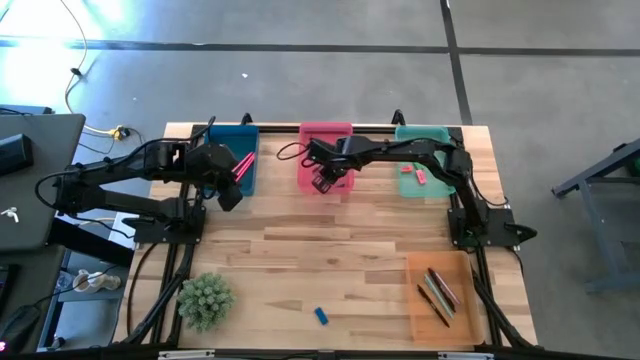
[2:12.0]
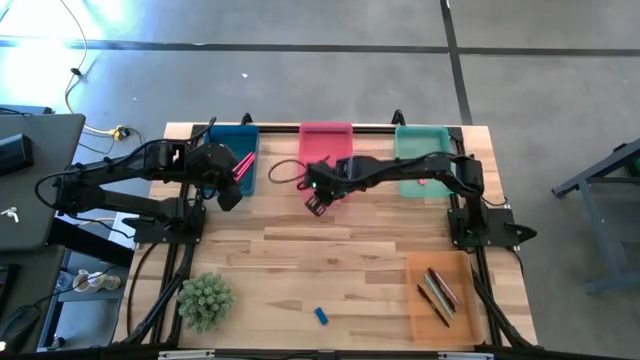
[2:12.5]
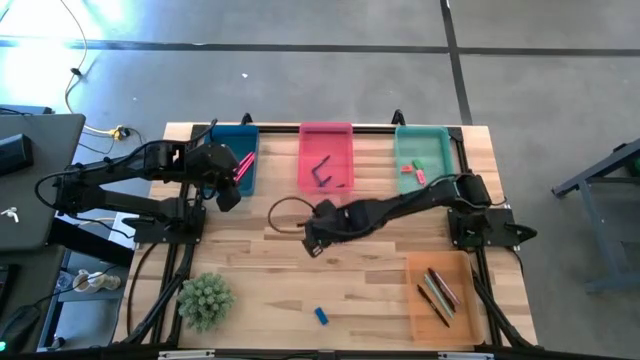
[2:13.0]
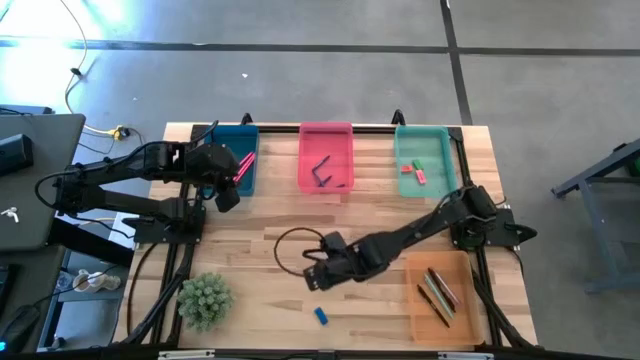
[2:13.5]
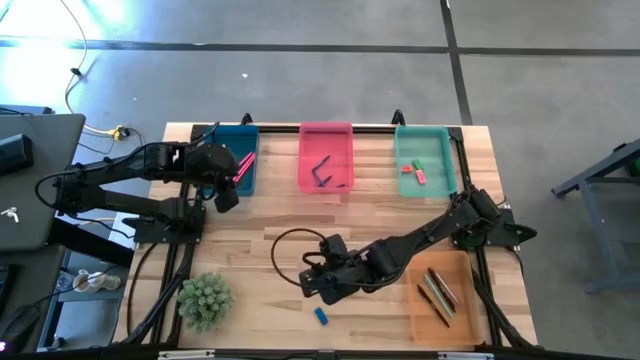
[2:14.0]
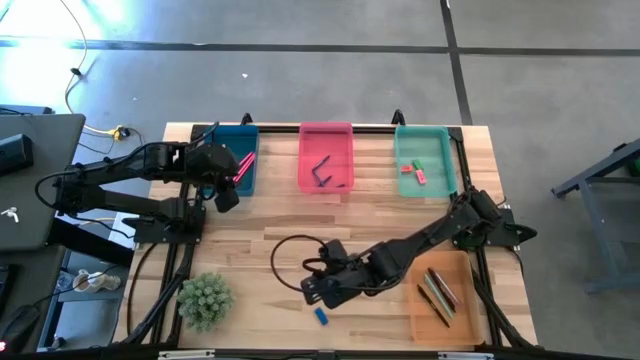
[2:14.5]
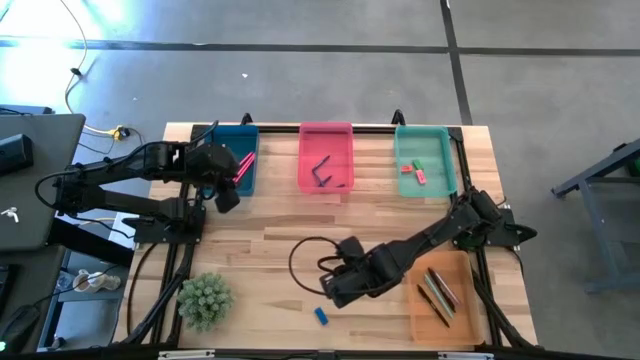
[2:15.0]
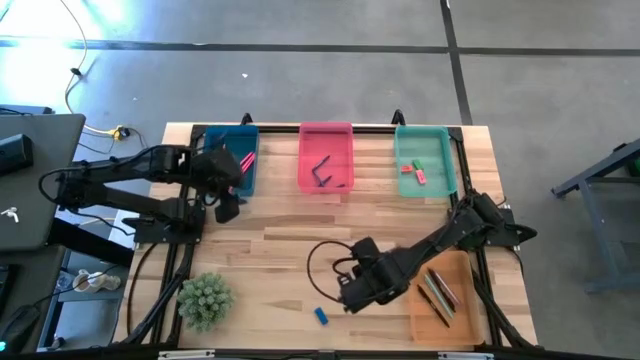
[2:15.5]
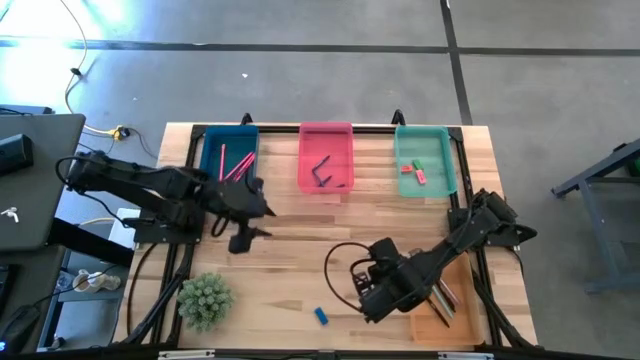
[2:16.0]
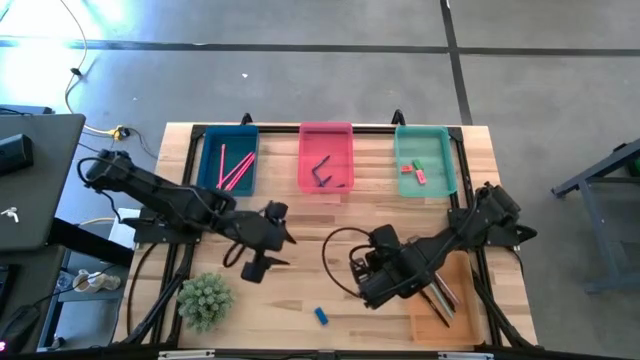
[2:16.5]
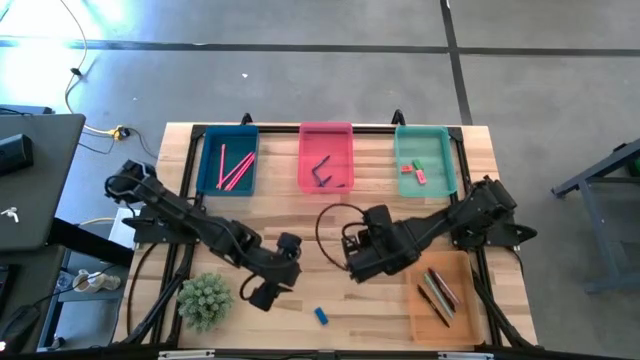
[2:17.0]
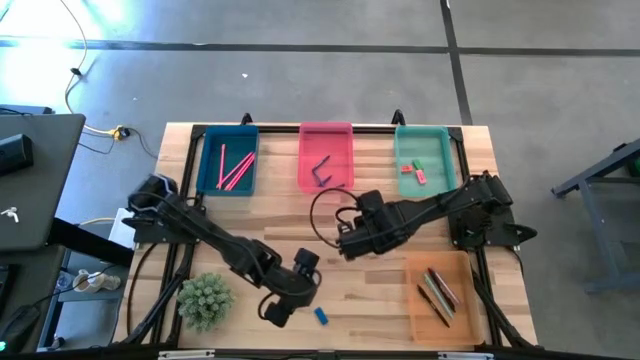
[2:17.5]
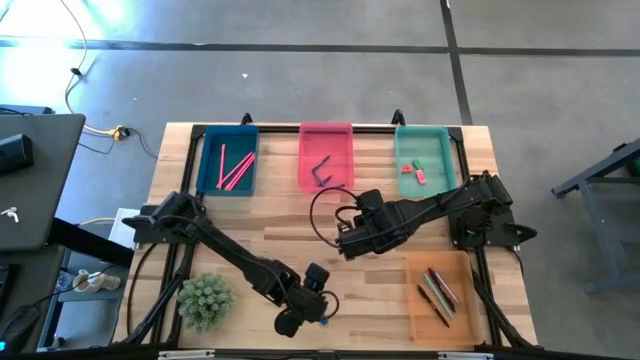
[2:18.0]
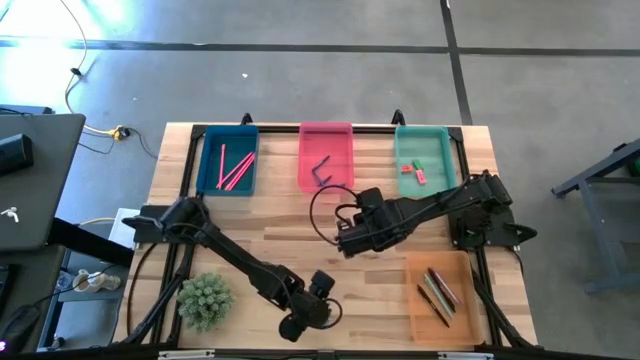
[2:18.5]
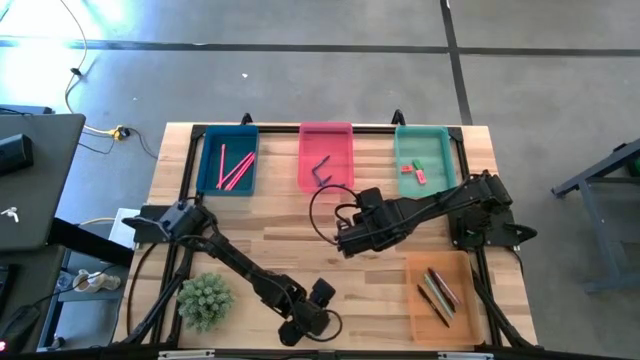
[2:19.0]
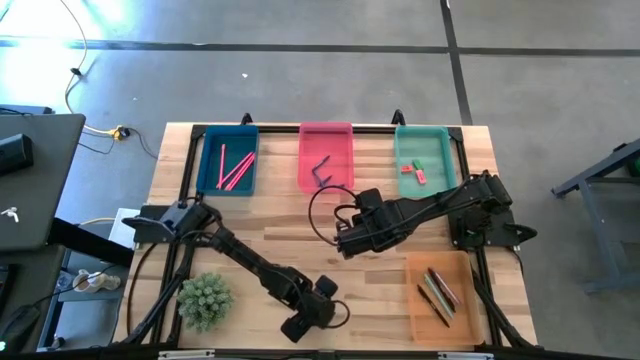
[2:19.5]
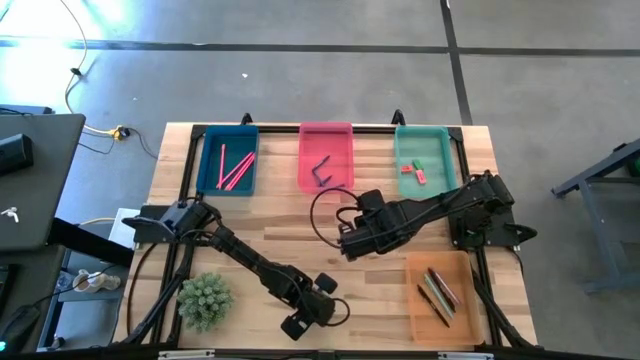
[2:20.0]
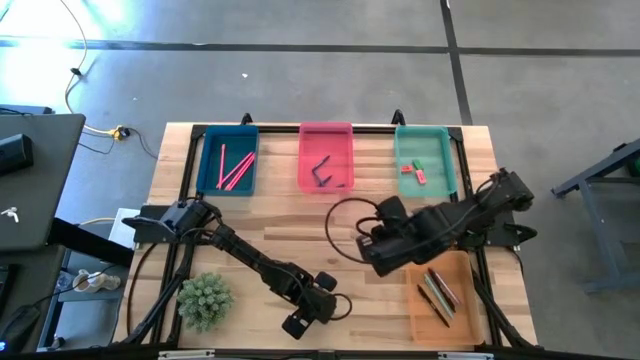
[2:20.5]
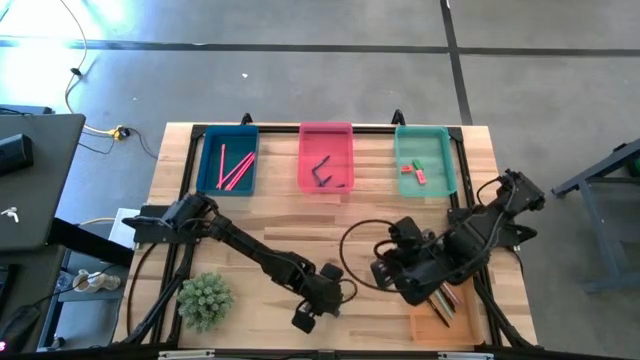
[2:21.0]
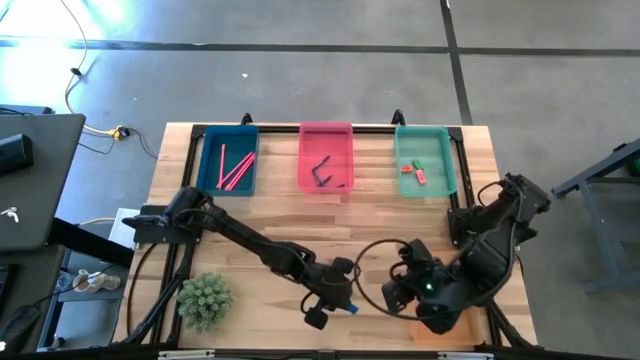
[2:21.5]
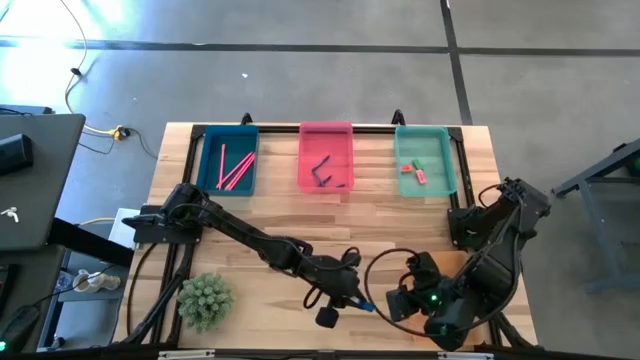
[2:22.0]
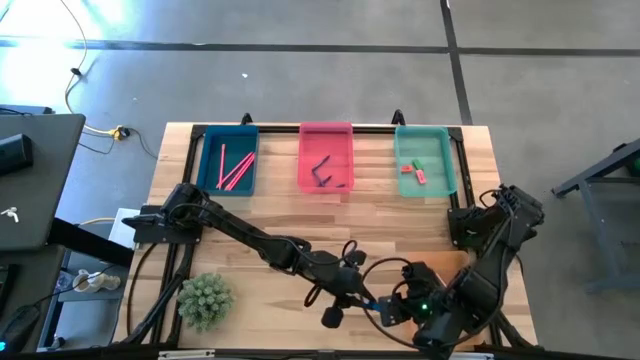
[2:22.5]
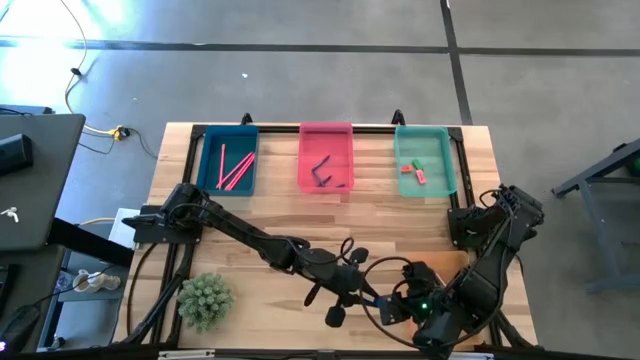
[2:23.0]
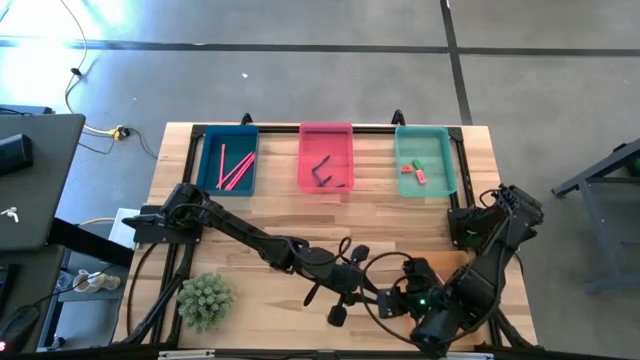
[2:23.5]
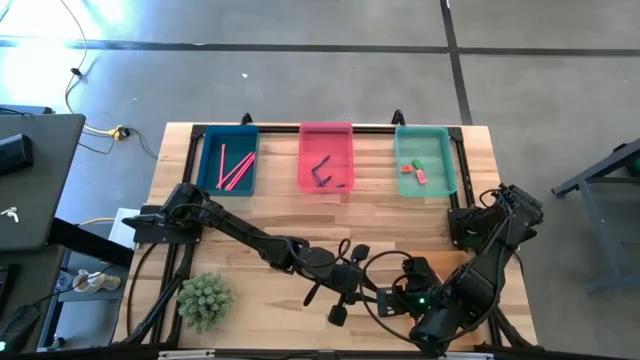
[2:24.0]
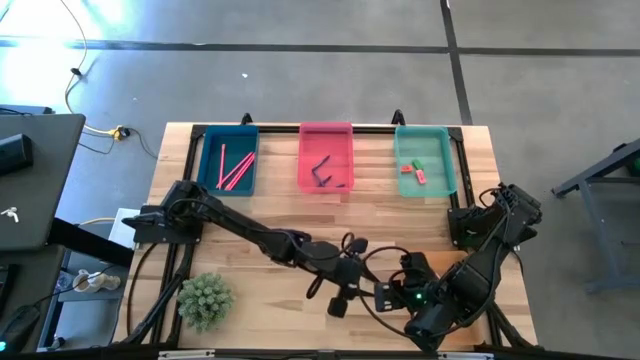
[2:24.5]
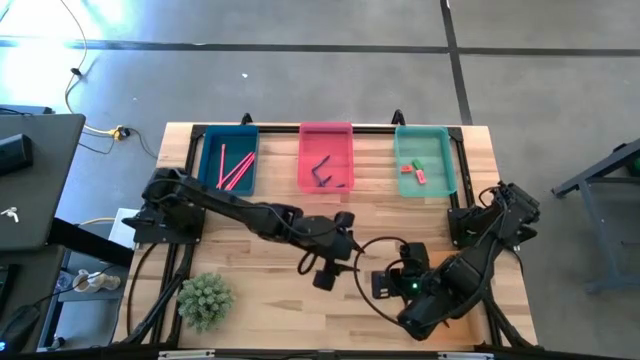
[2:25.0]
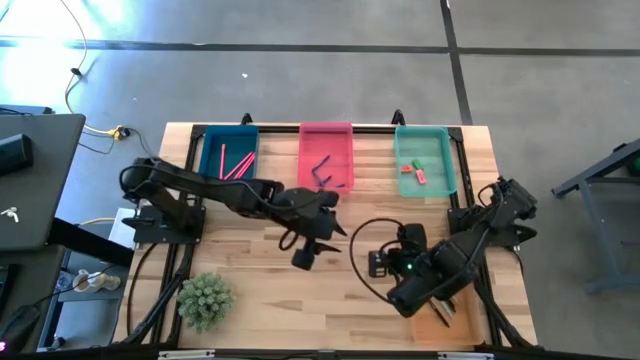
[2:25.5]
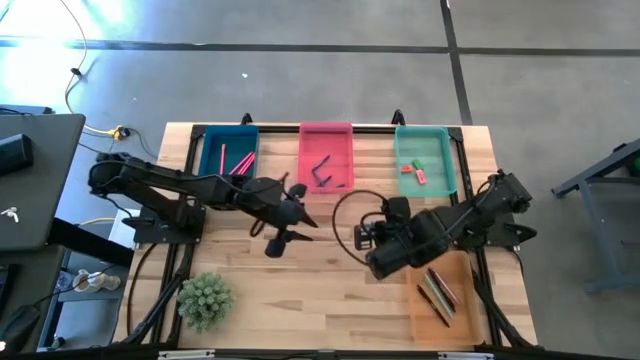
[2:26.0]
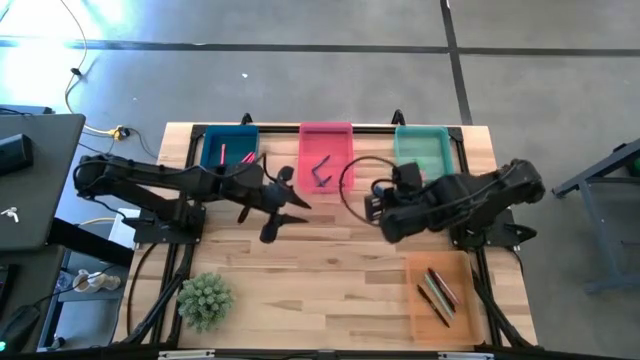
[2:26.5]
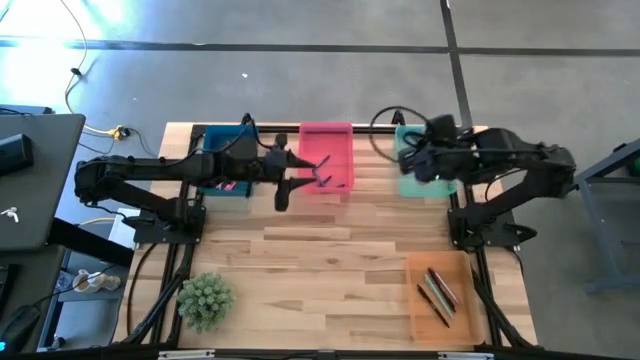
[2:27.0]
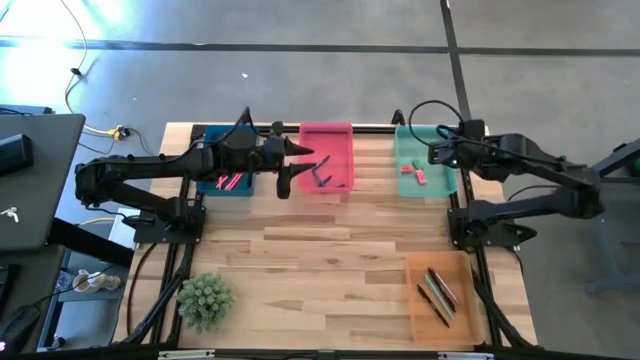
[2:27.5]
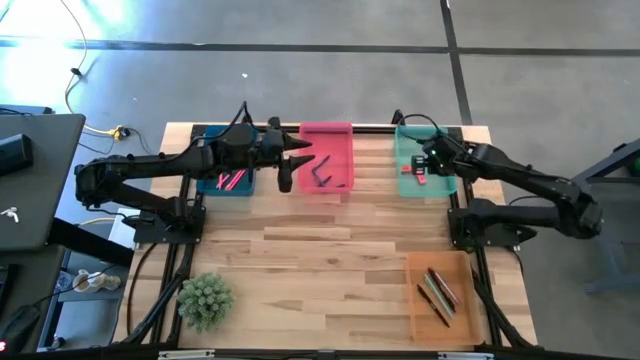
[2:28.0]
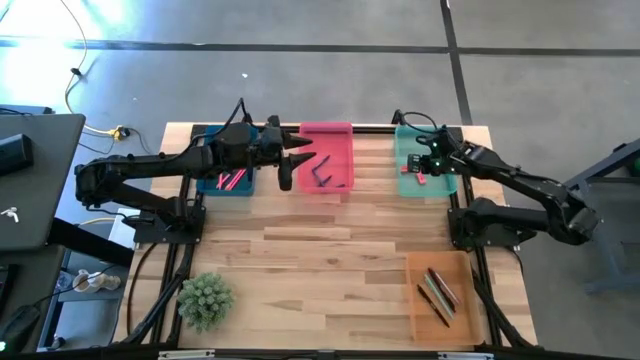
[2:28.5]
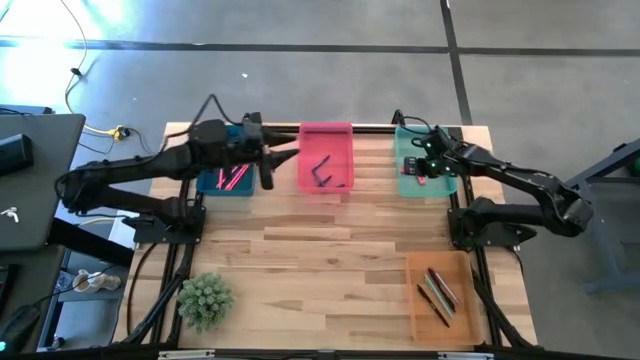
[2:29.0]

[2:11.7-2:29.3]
Task: Sort crayons/erasers/pens/pencils in bins
Put the blue eraser into the green bin

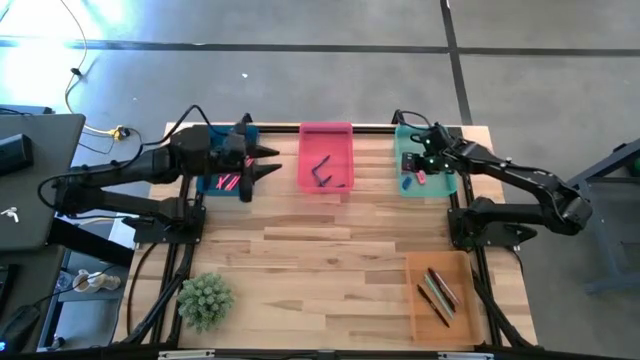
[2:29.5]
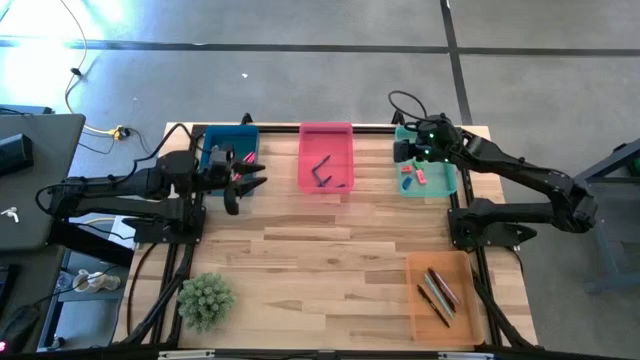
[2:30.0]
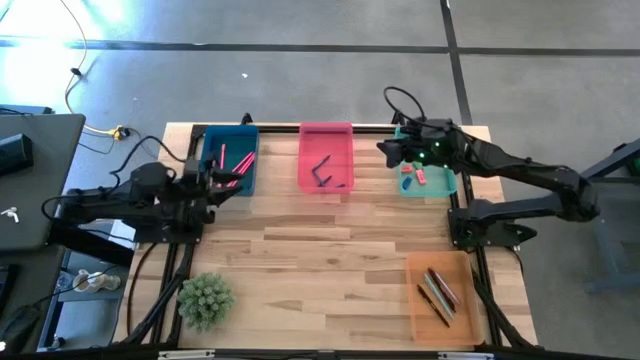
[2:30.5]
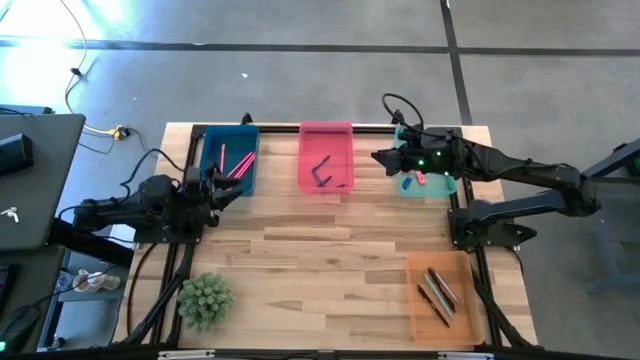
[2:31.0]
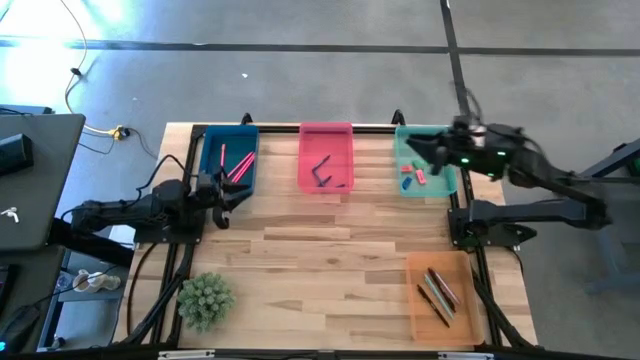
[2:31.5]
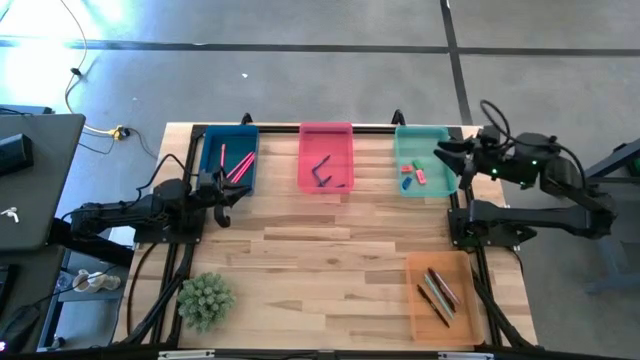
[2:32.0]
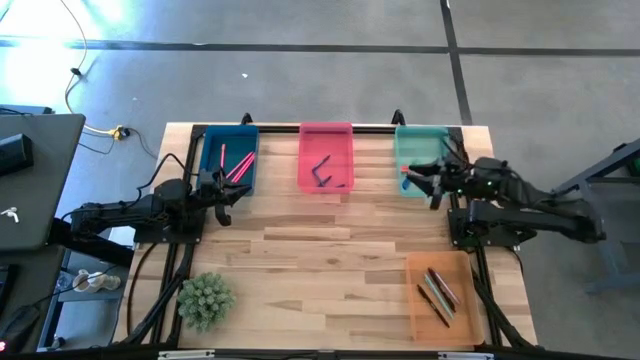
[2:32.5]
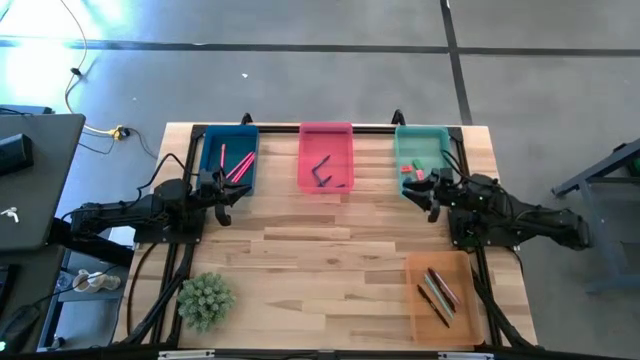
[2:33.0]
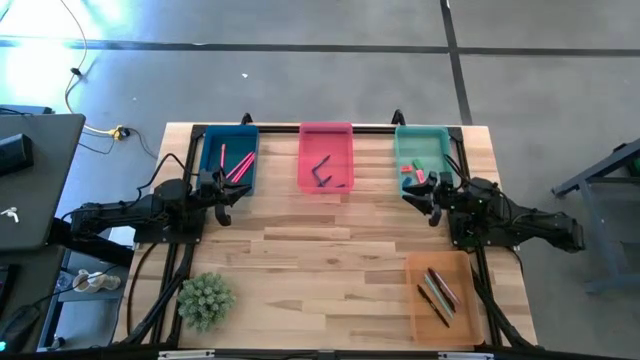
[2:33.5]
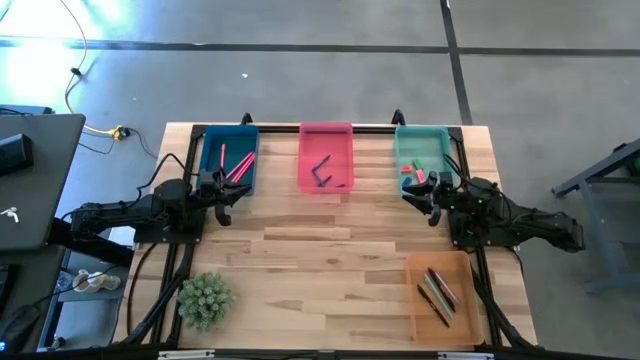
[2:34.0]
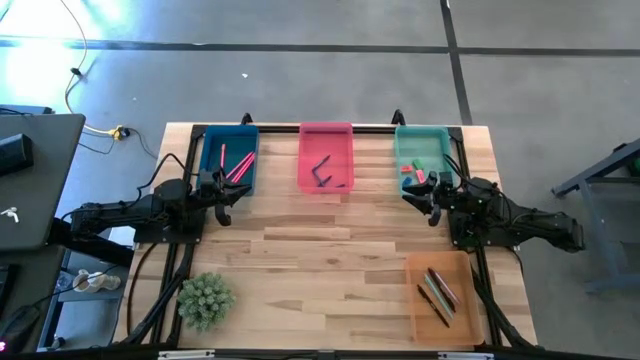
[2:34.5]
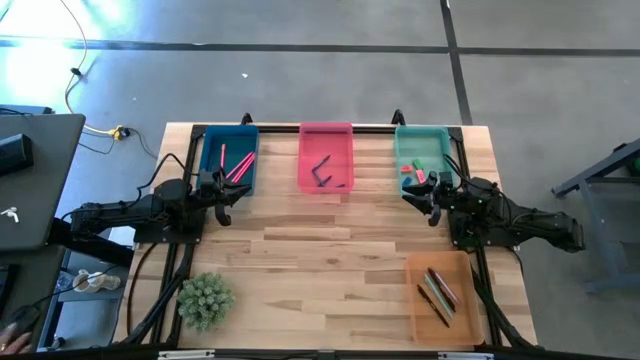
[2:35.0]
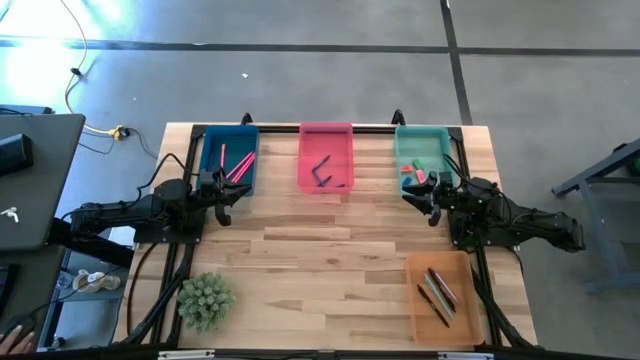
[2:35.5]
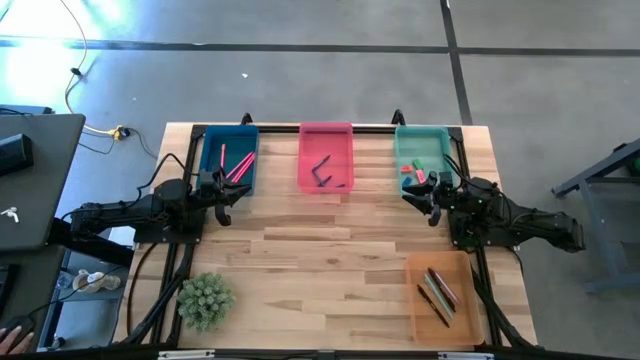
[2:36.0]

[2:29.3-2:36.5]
Return to Home Position
